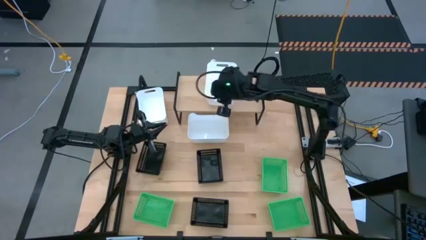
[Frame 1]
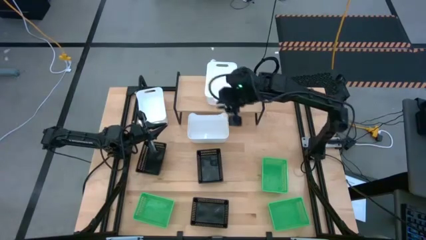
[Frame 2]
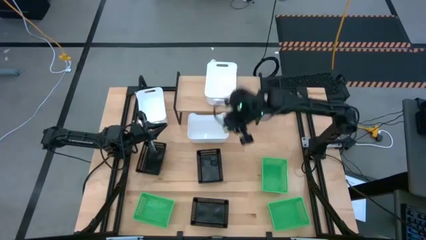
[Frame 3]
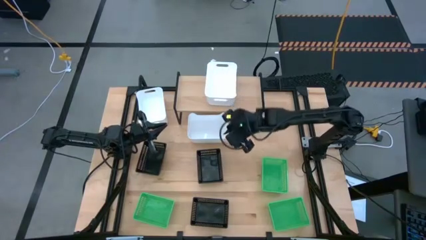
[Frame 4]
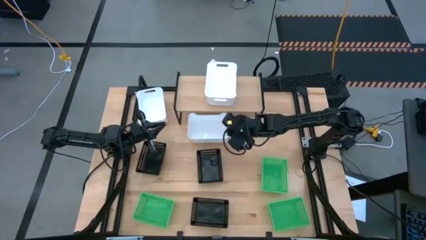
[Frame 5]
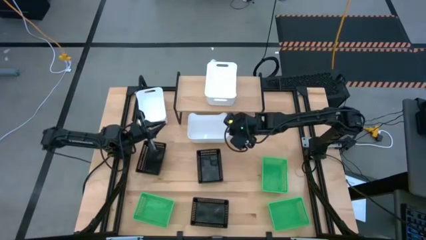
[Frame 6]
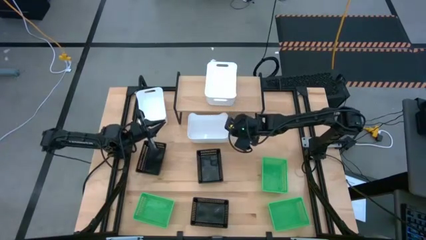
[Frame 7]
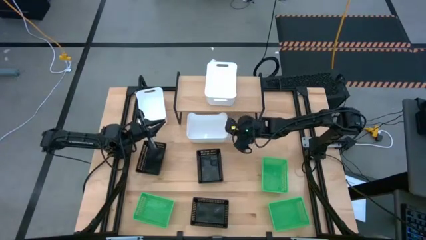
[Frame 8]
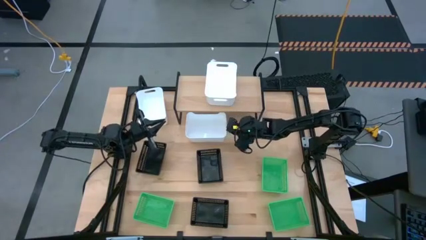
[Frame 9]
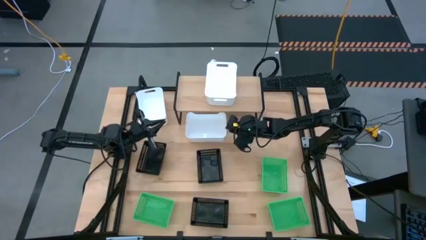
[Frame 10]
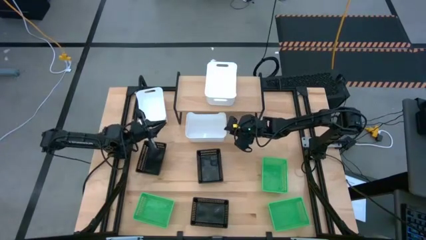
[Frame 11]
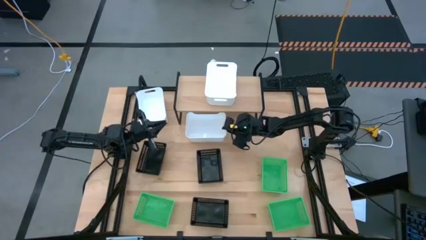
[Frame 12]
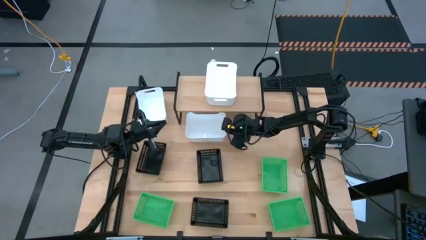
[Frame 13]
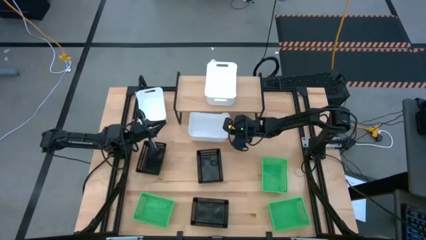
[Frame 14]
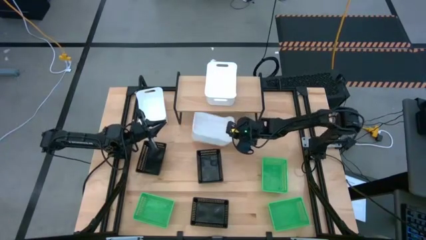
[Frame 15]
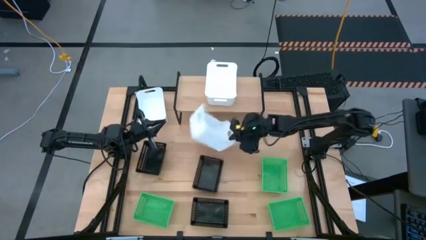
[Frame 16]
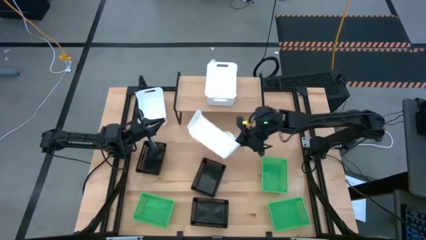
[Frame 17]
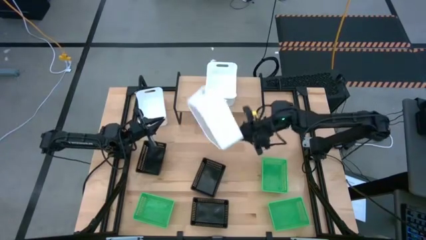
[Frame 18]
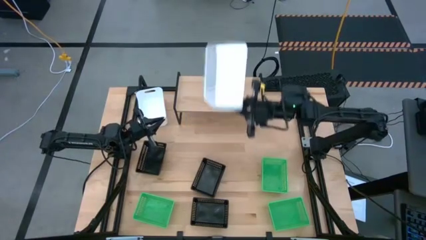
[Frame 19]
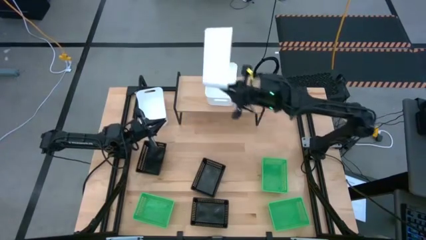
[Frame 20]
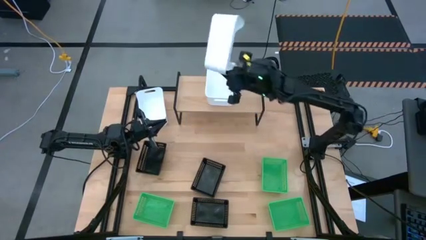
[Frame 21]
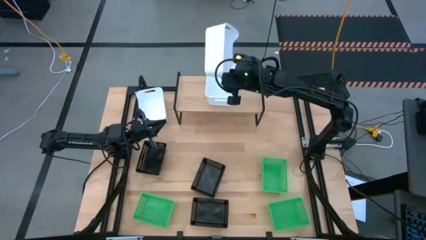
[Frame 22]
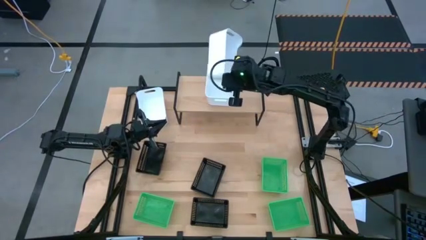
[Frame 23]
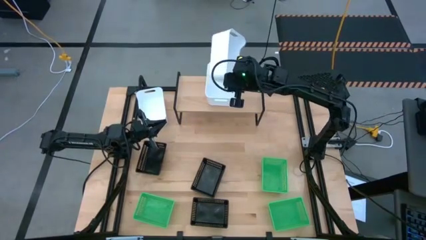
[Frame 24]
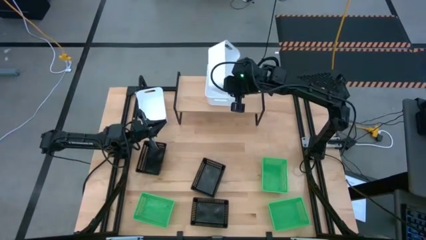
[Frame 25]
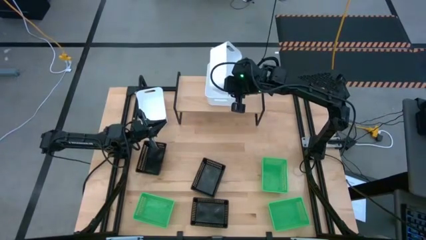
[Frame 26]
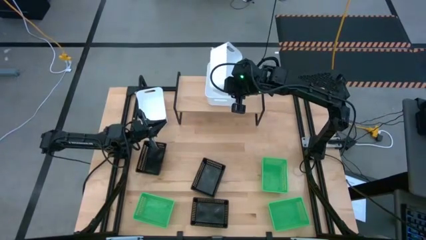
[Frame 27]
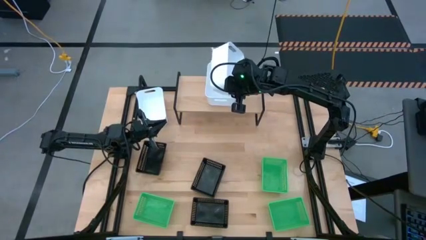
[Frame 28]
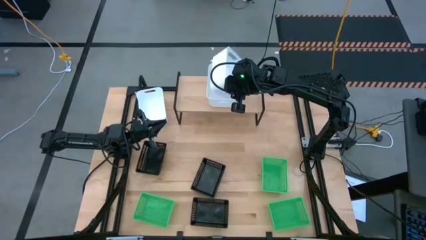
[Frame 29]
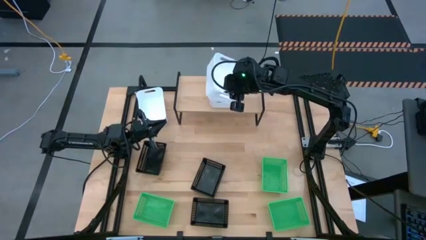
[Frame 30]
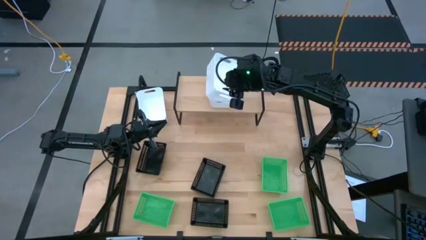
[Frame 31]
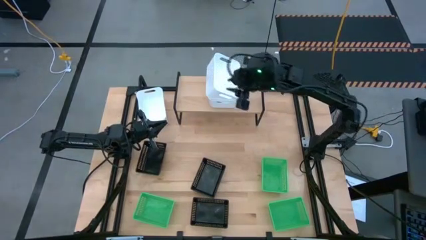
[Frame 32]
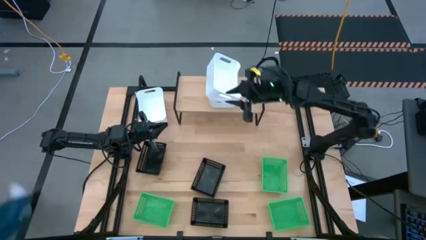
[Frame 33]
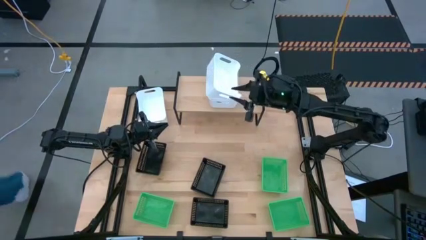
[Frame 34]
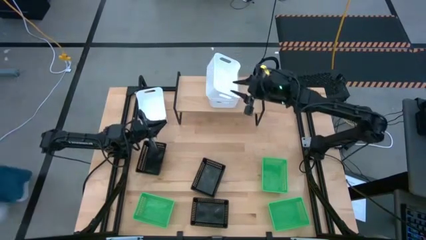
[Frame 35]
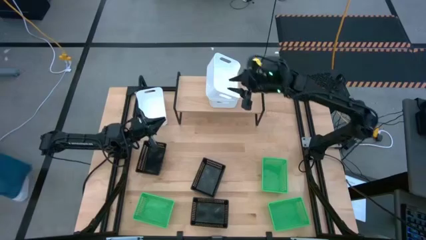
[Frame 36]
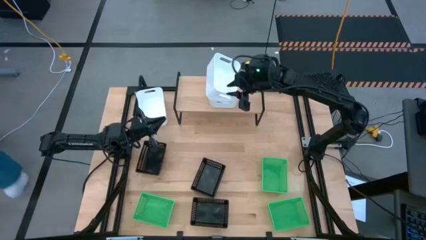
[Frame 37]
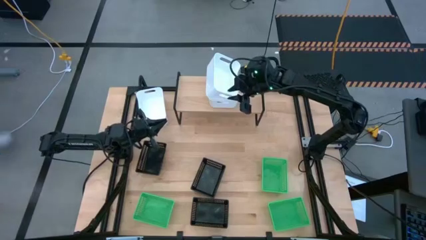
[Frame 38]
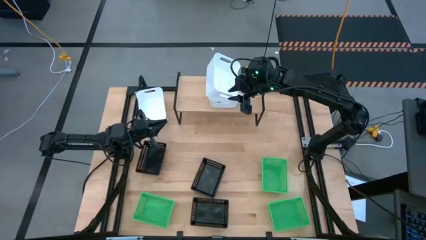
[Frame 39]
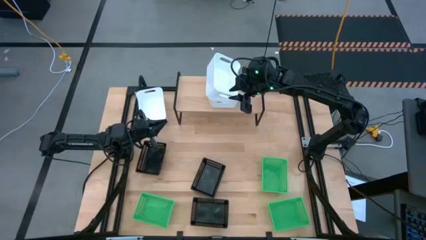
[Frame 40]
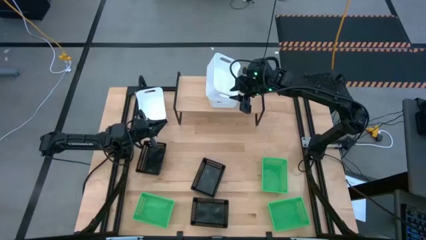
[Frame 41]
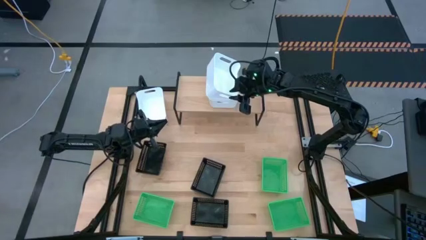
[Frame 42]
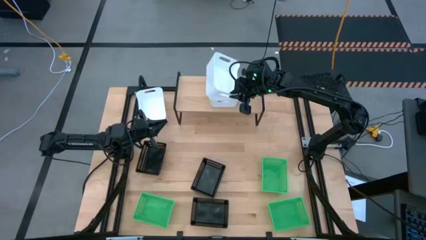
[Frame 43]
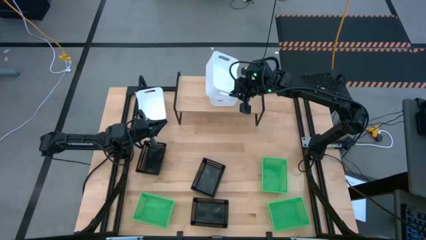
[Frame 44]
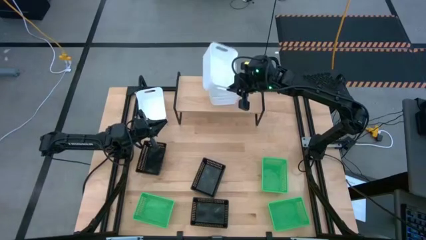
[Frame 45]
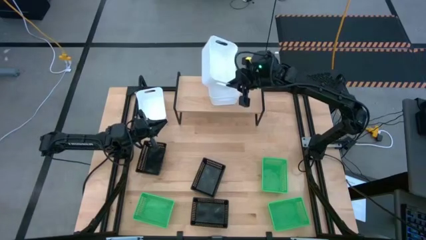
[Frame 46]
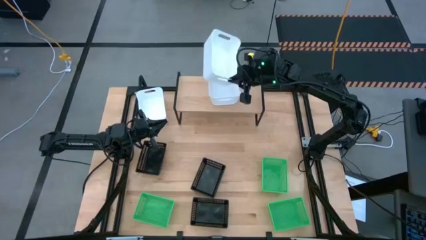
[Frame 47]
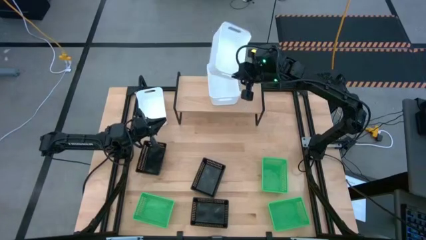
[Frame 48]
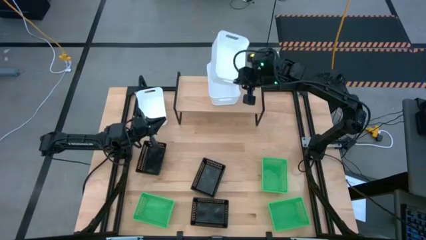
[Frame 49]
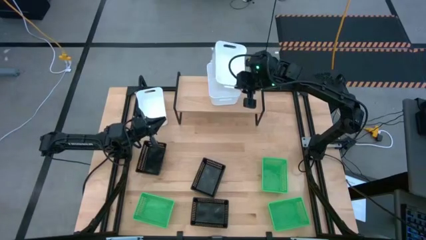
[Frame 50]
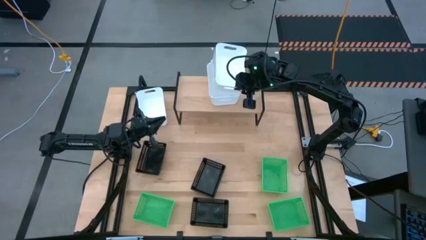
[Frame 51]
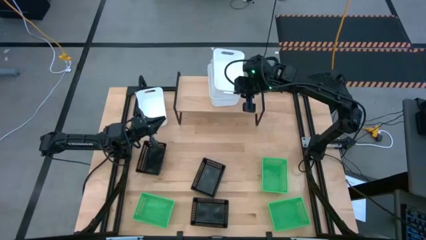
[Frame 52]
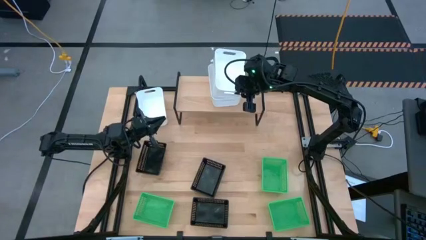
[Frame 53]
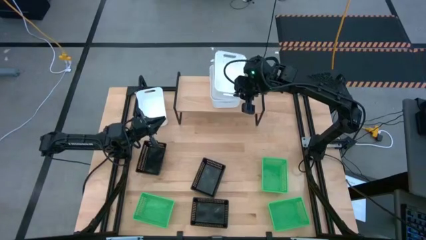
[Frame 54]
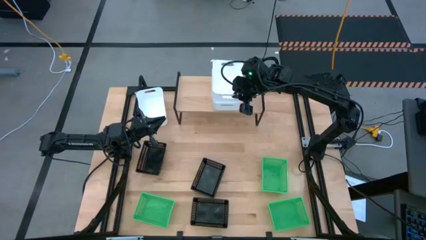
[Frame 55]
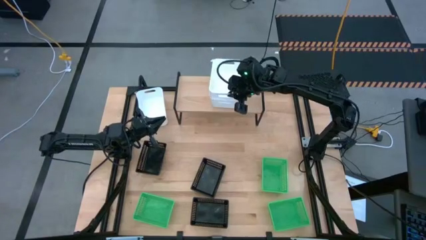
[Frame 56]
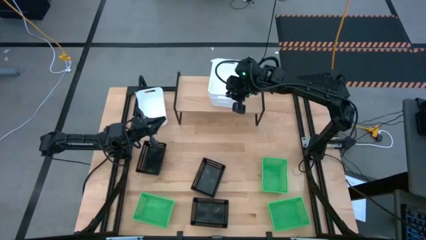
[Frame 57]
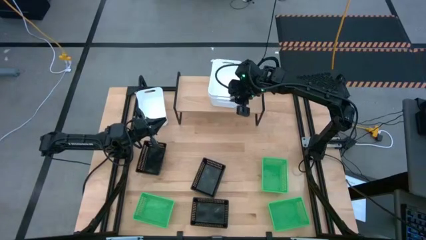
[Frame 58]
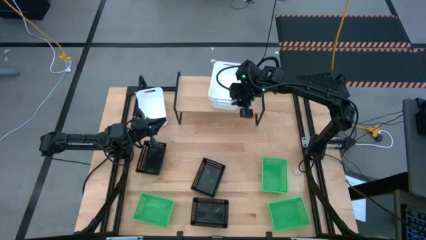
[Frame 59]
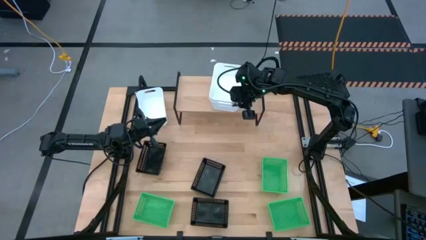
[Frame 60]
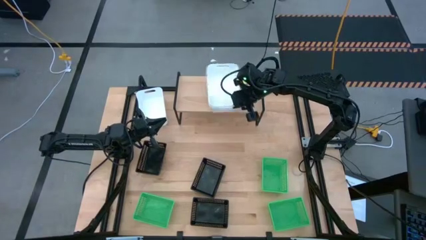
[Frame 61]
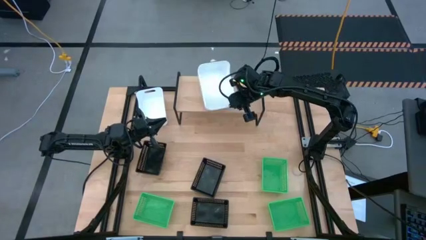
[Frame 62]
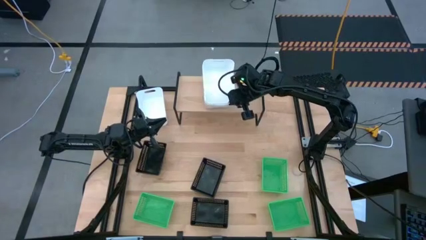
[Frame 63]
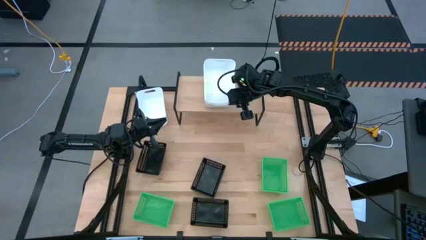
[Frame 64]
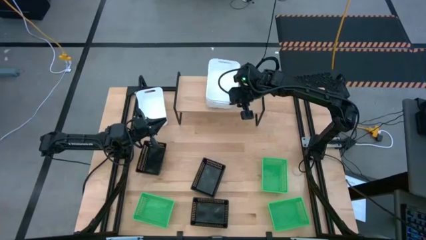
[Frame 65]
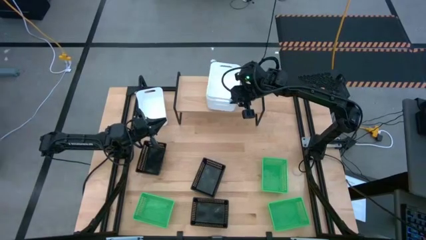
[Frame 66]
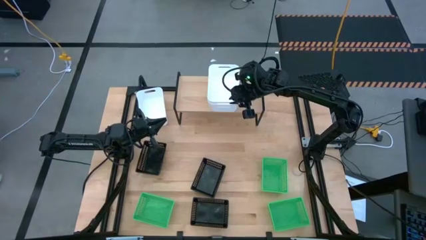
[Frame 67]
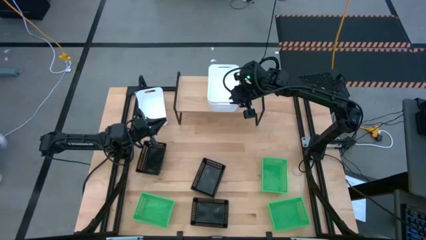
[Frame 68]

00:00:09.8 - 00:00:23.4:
Task: Stack baskets on shelf by color
Stack the right white bin on top of the other white bin on the shelf

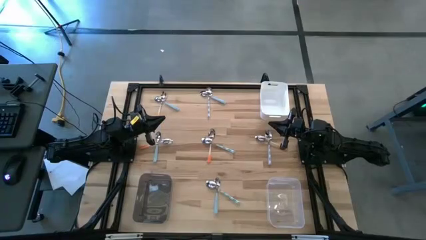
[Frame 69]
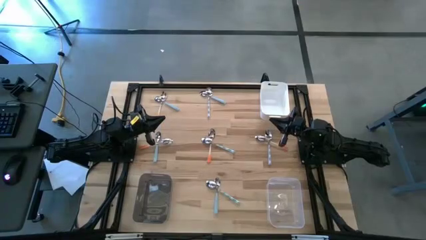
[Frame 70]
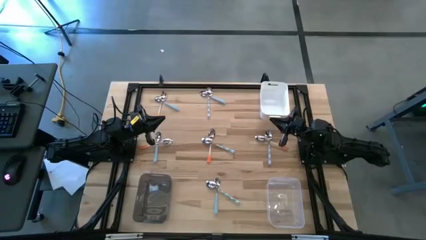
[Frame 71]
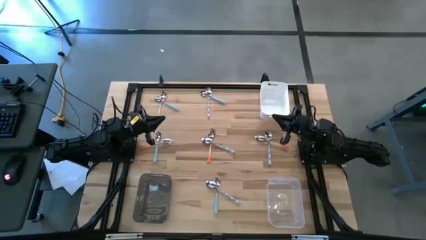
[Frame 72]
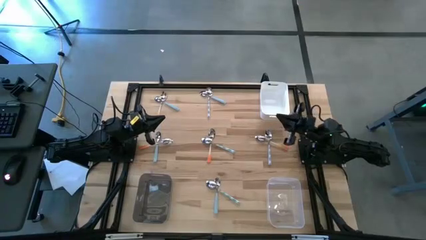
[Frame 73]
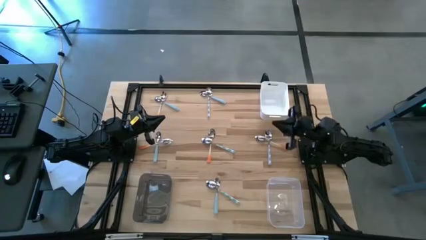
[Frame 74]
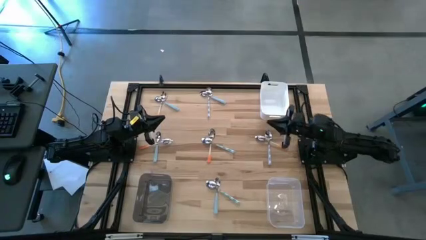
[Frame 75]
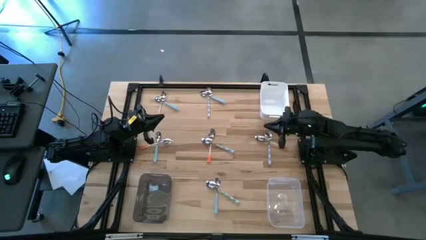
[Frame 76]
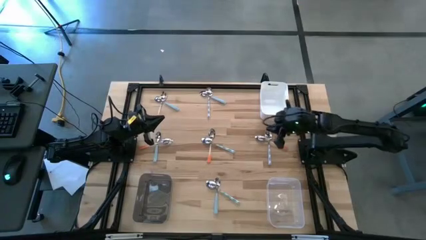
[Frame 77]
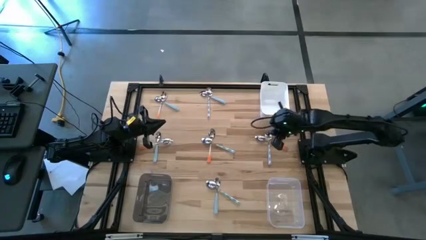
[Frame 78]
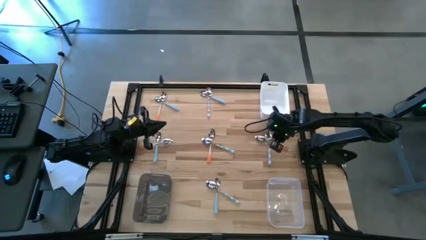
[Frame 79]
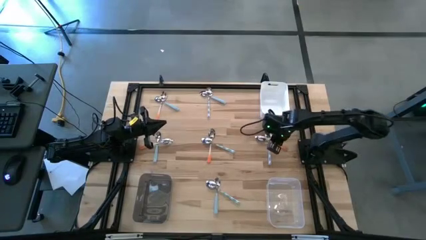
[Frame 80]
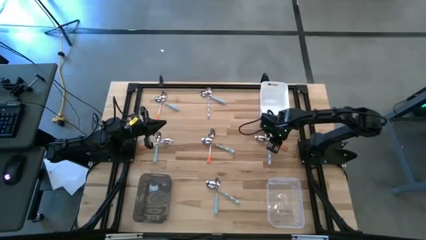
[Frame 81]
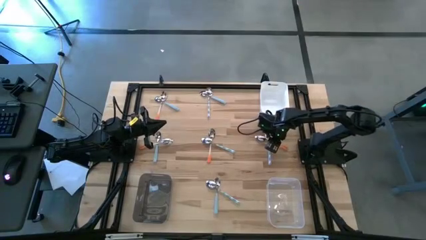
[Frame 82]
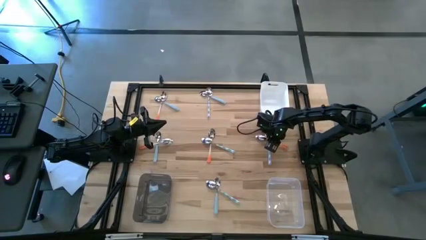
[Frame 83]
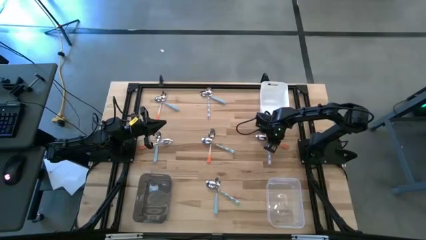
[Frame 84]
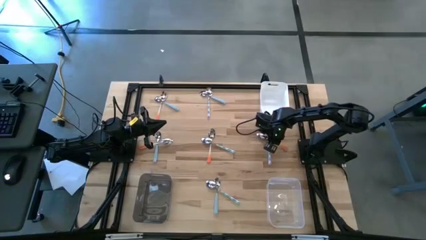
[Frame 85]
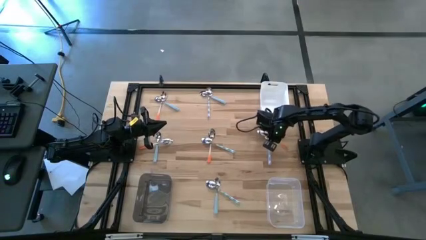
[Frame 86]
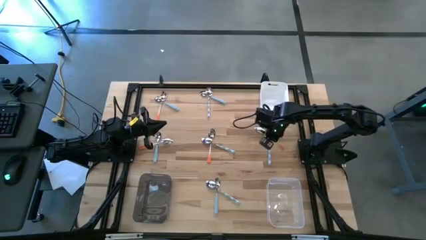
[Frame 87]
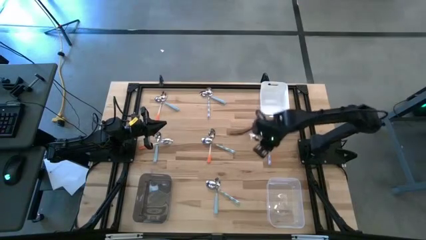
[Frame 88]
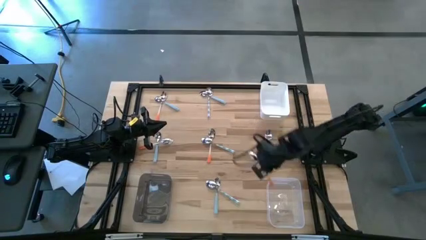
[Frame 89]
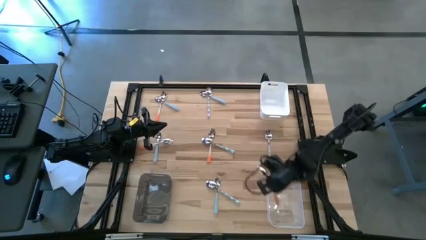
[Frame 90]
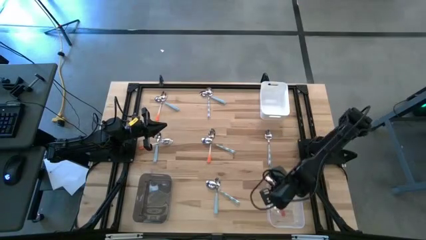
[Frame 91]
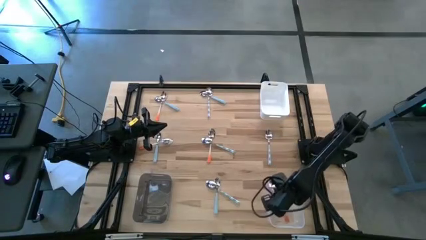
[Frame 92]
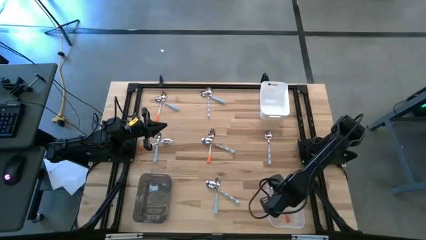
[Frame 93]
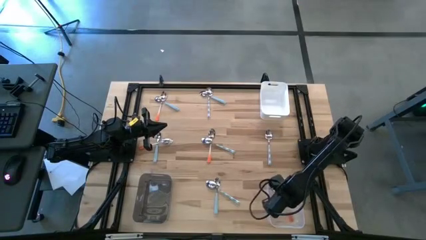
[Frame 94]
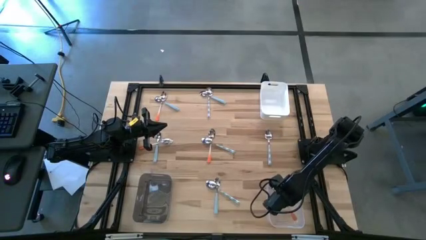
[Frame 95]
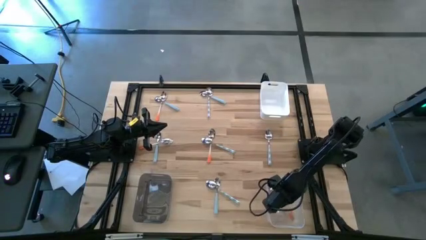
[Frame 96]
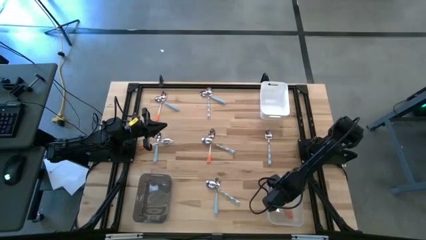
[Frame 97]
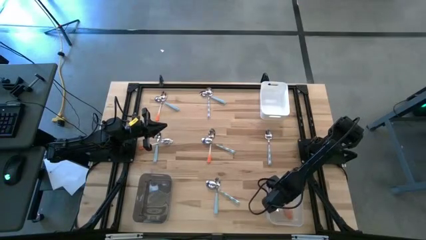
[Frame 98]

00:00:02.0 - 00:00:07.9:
Task: Sort silverware by color (type)
Put the orange spoon into the transparent bin
